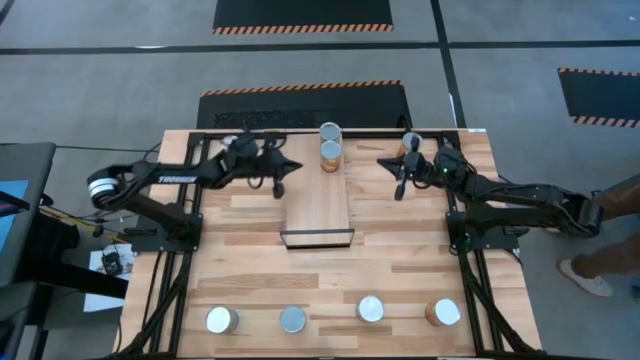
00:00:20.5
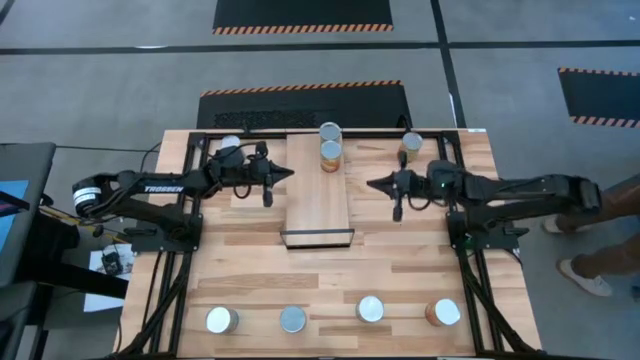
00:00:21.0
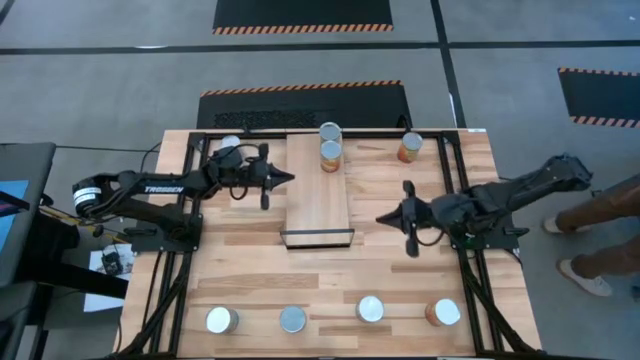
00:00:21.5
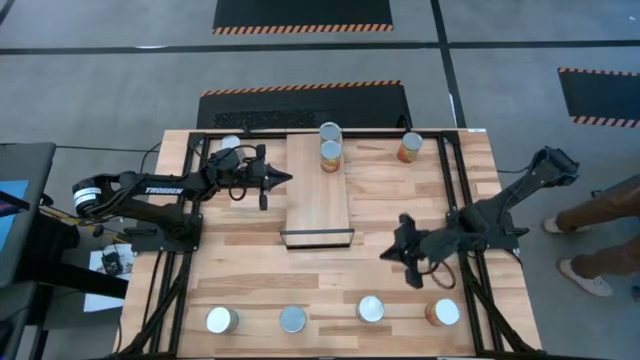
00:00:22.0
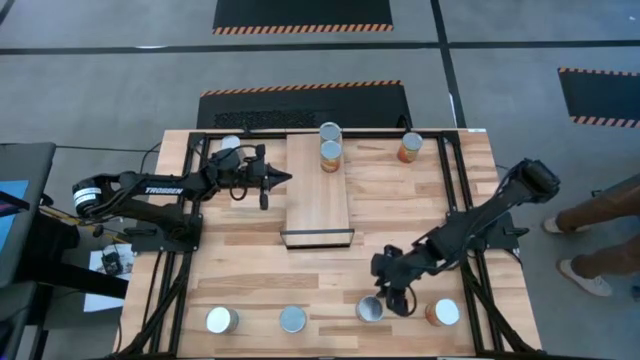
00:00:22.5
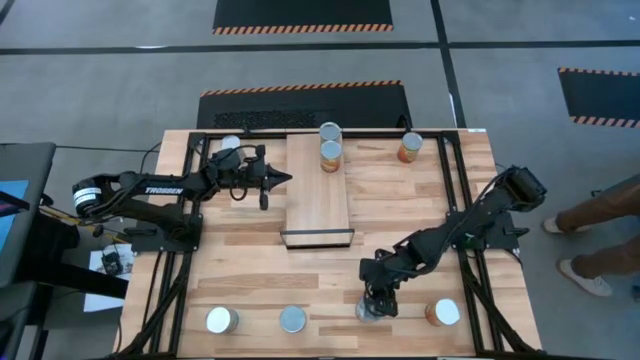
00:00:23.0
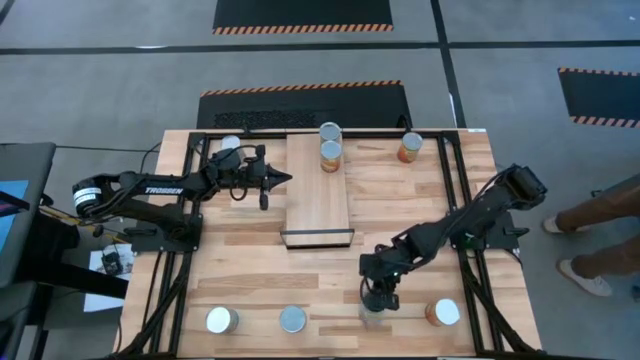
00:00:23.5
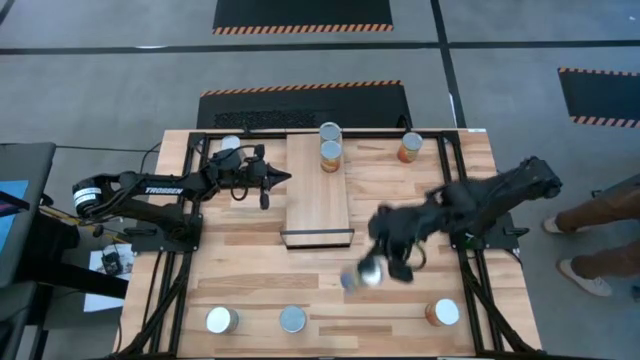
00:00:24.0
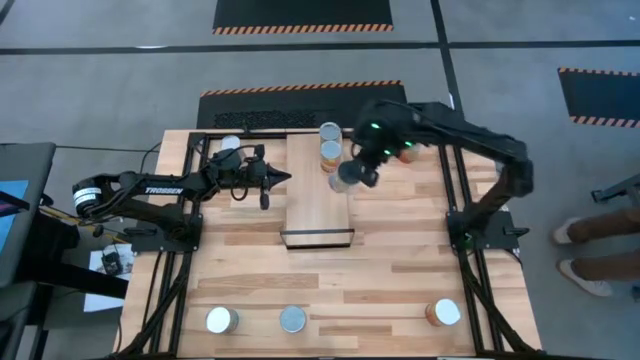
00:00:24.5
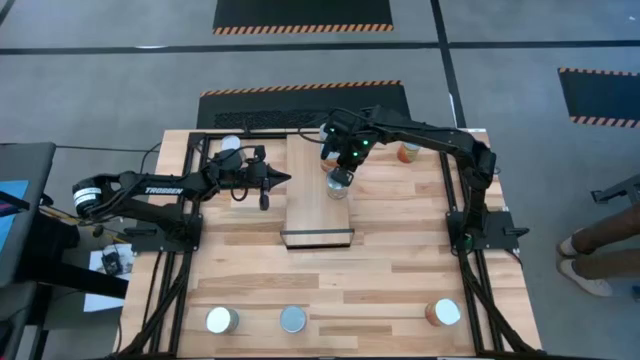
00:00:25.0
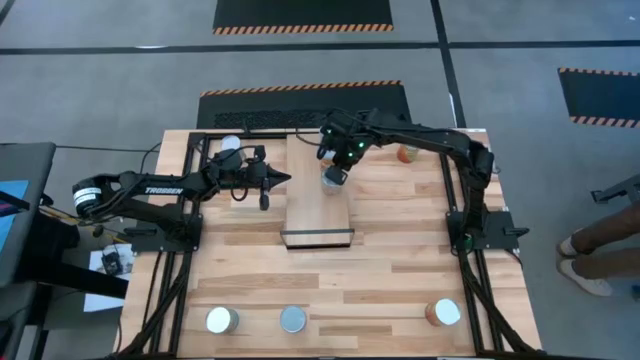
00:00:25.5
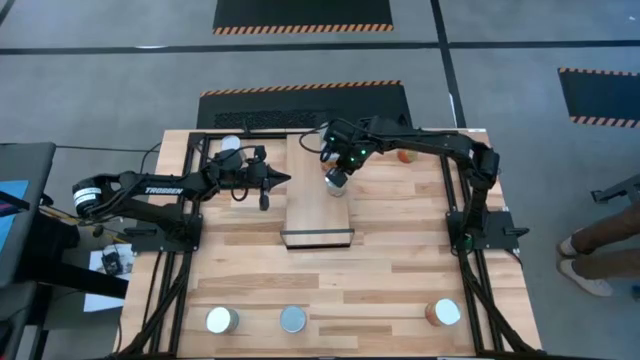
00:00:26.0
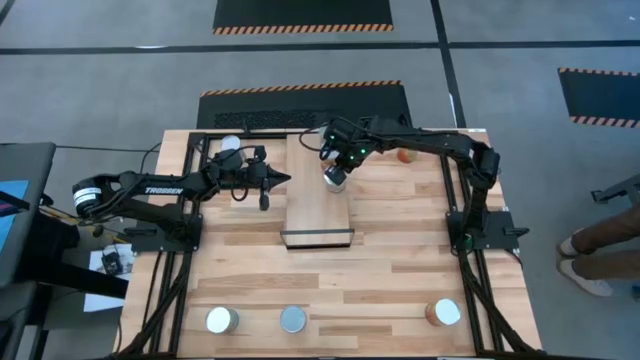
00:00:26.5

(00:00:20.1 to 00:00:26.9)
Task: Pick and place cans onto a shelf
Put the bottom canned peaches on the shelf

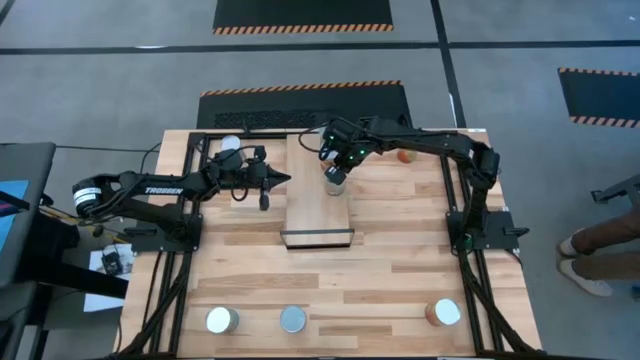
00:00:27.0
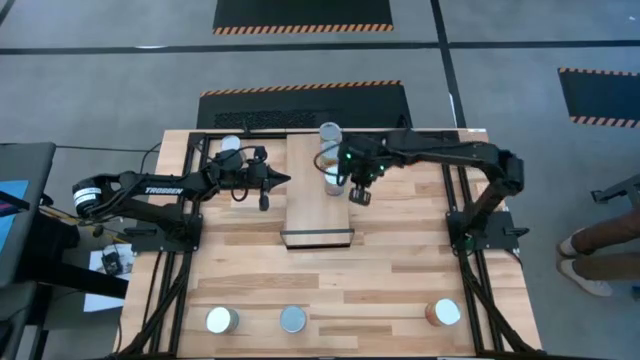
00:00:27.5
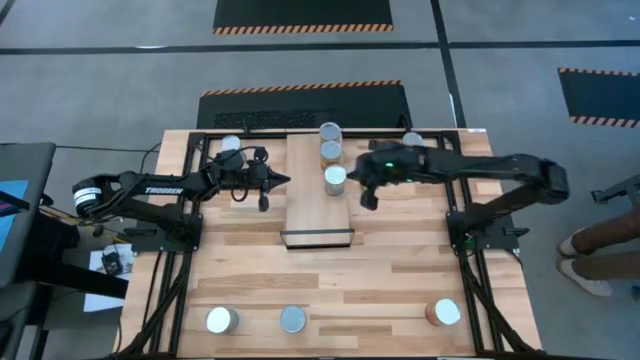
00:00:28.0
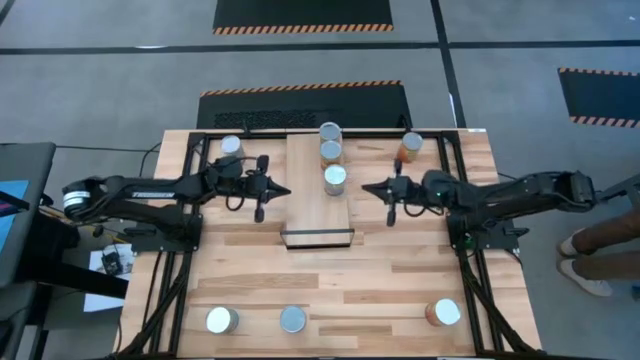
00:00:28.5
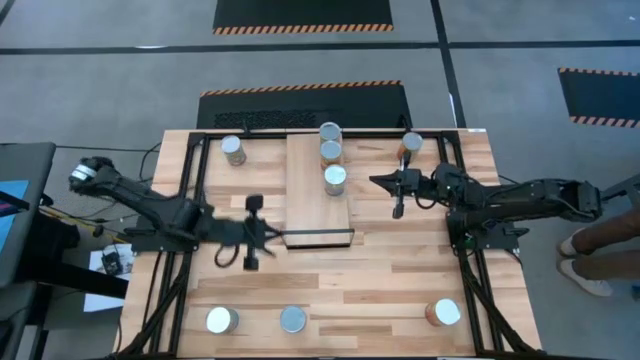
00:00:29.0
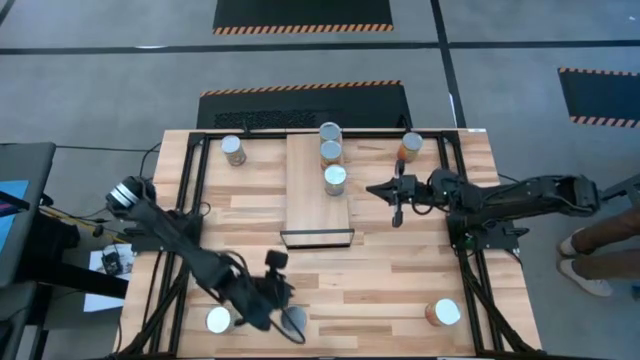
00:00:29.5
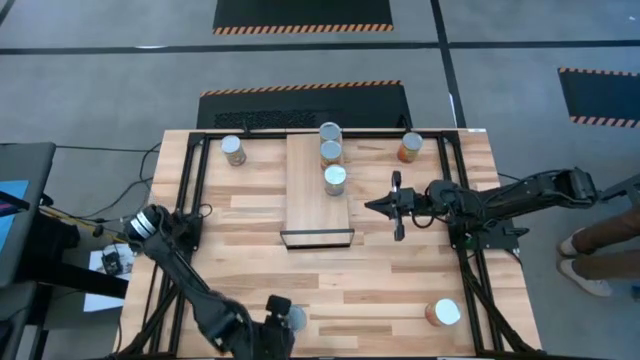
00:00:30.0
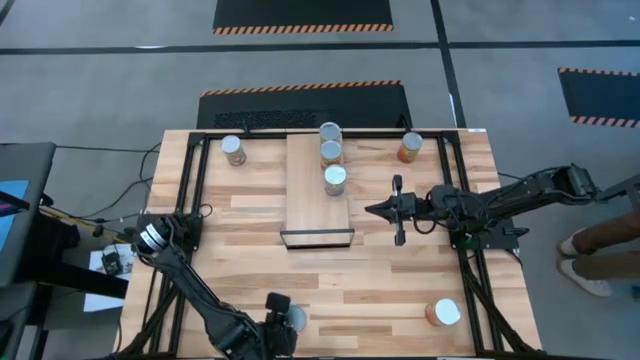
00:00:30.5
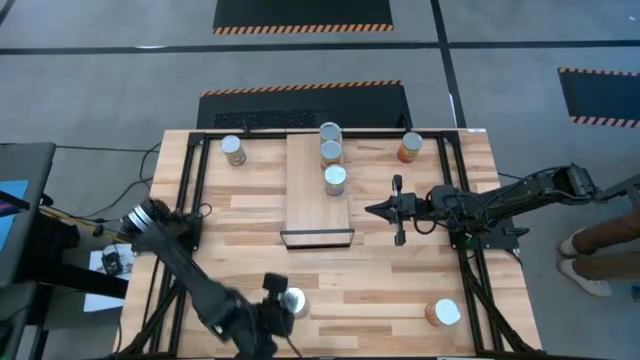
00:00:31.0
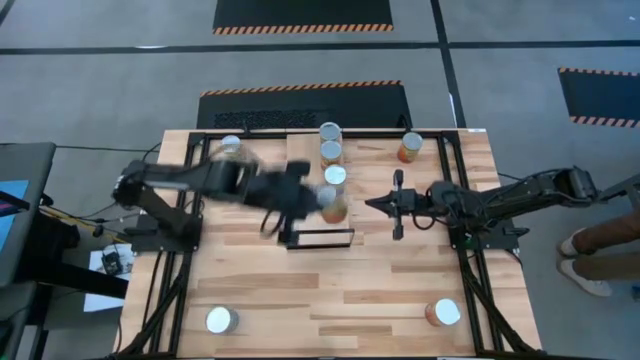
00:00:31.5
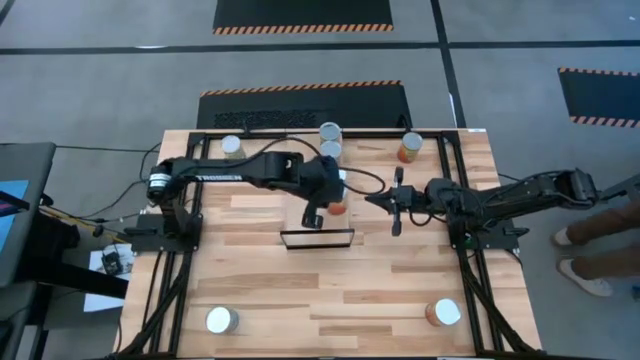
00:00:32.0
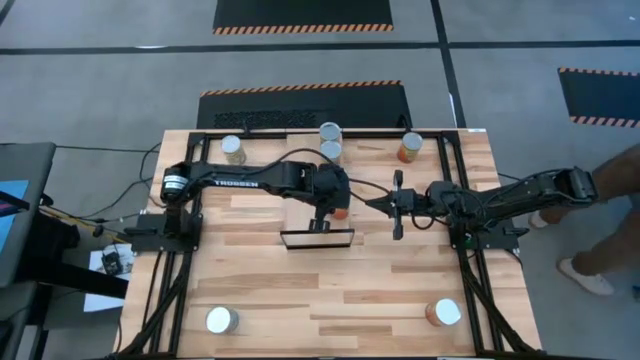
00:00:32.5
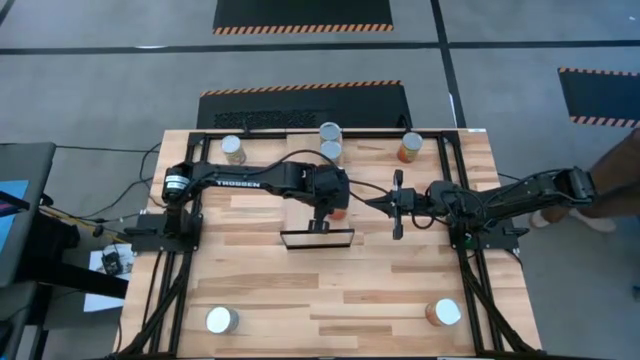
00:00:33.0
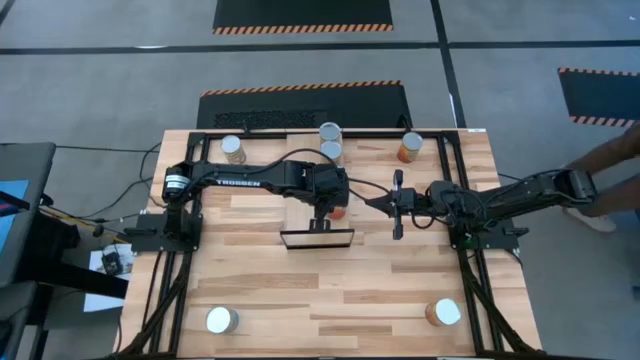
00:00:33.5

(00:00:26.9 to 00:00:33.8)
Put the bottom canned green peas on the shelf

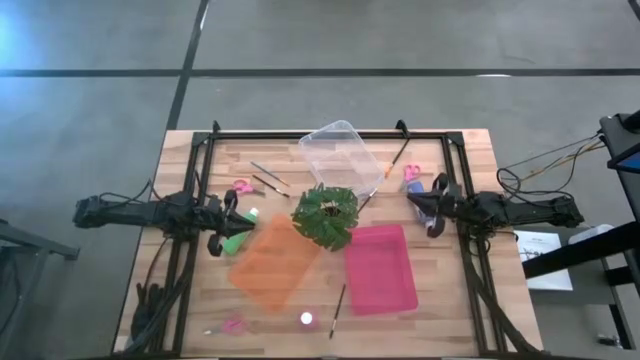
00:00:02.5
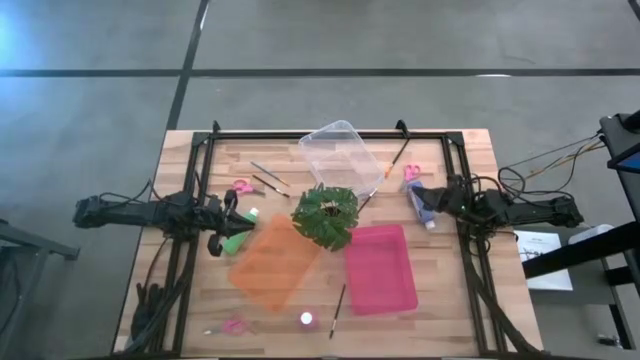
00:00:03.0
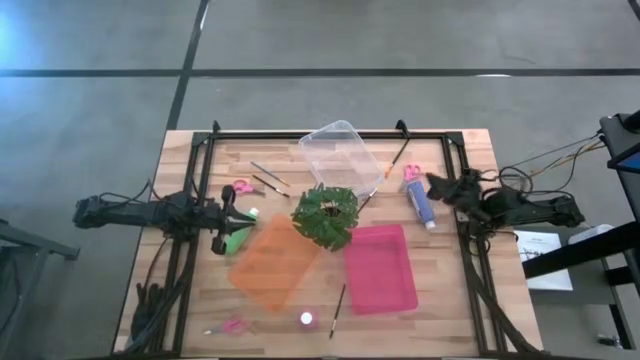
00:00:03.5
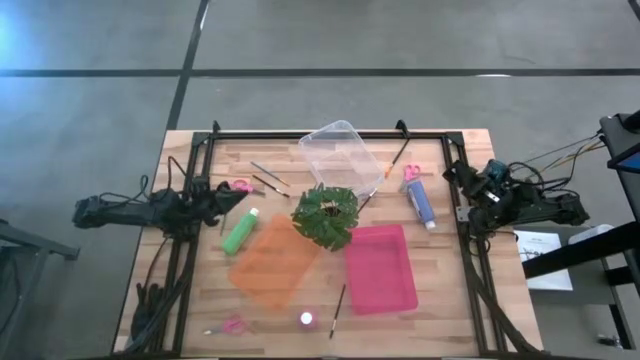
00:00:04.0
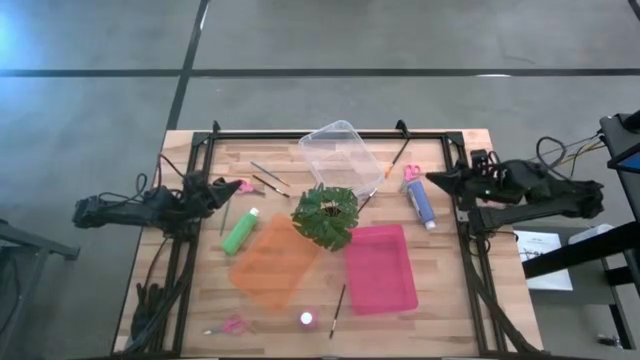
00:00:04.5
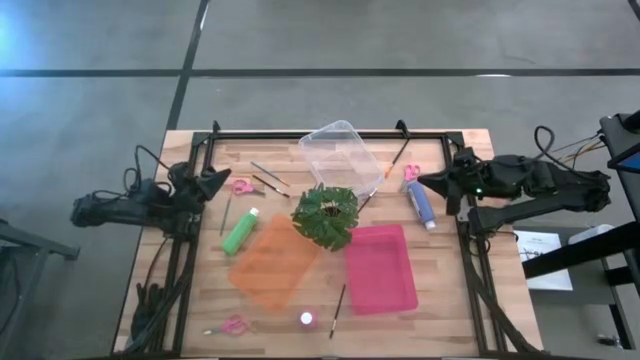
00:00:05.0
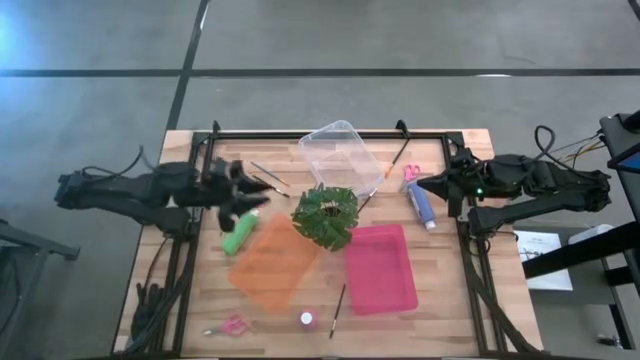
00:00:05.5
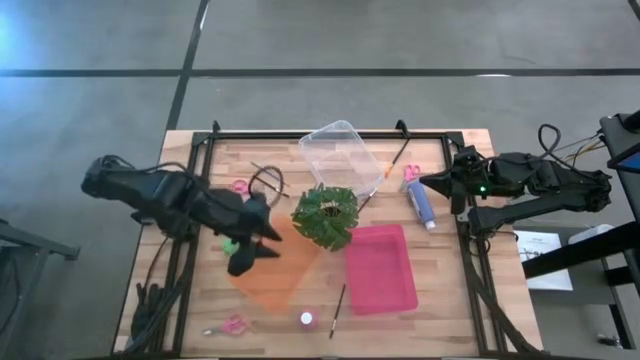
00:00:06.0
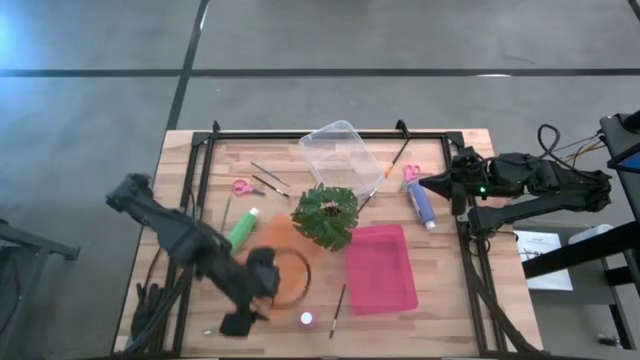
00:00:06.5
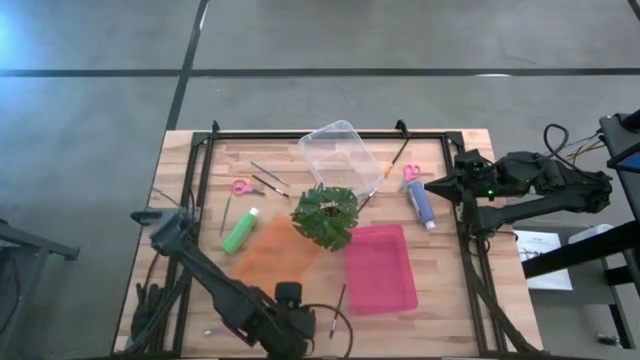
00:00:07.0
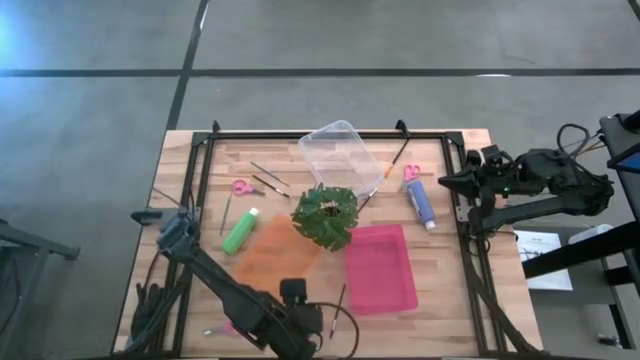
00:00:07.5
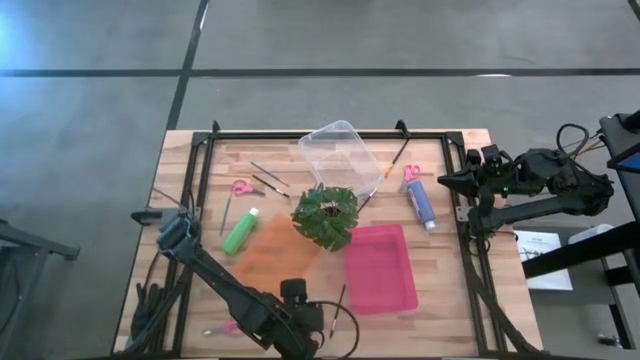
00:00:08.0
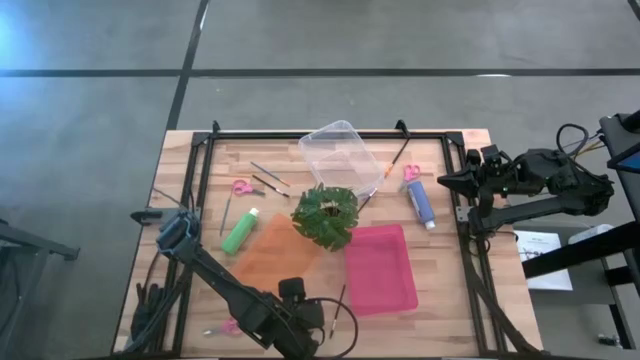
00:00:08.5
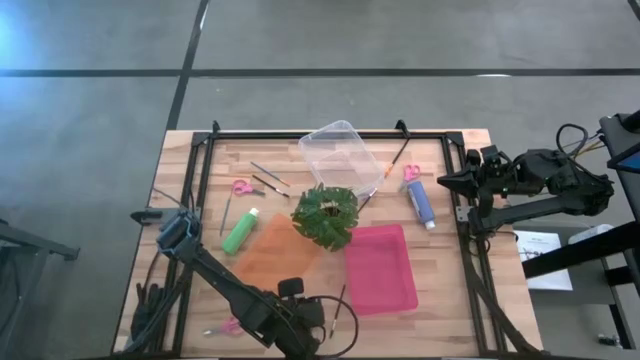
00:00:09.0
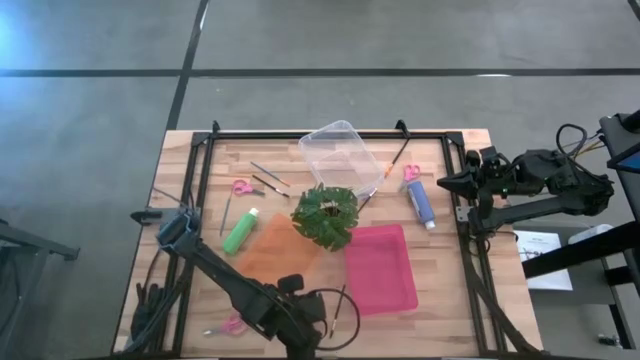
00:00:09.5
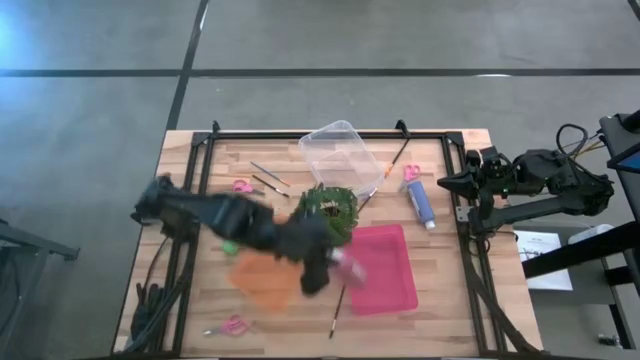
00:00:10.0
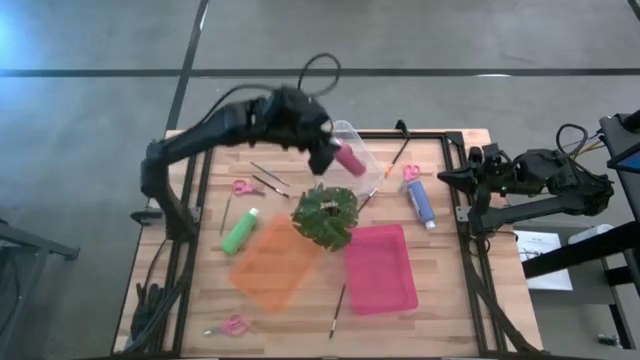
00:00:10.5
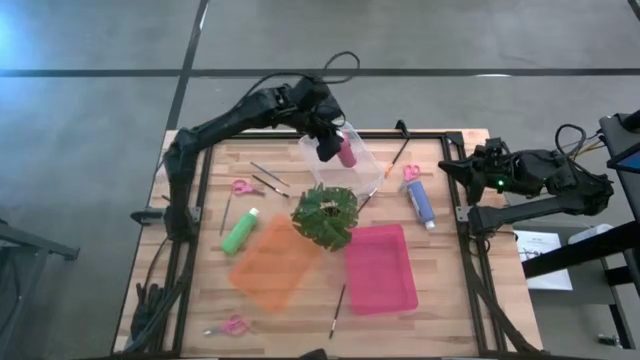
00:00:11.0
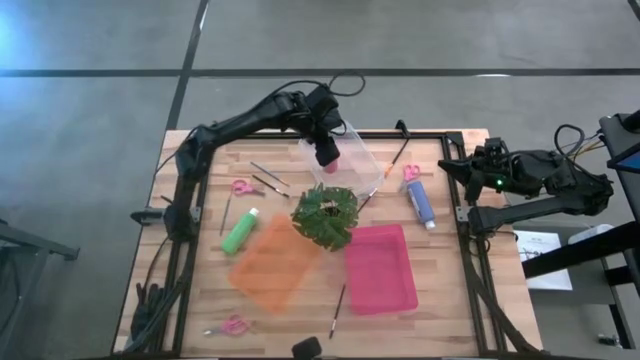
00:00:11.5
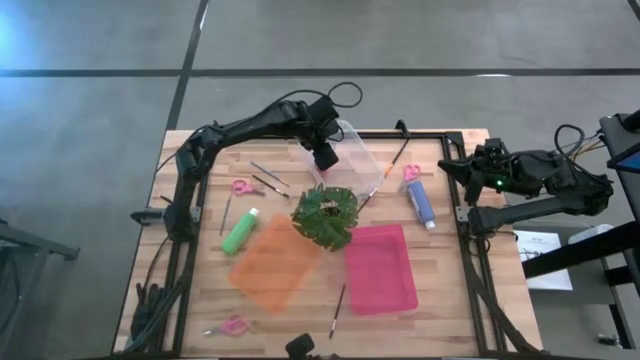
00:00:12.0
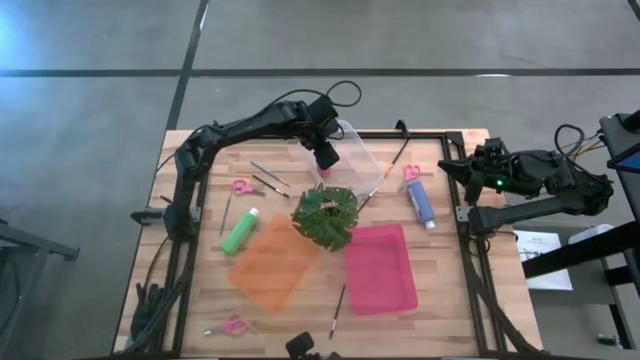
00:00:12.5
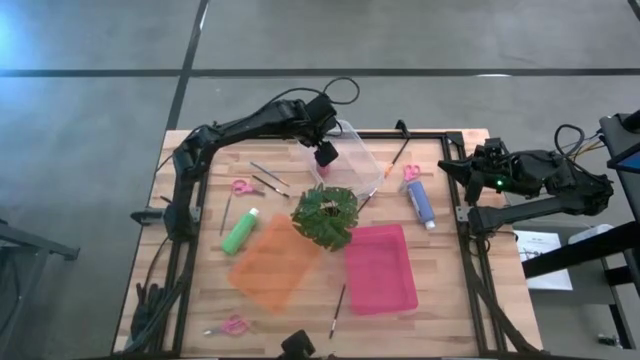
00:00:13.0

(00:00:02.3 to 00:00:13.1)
Task: Pick & Place Paint Supplies
Put the pink acrylic craft paint bottle into the transparent bin
